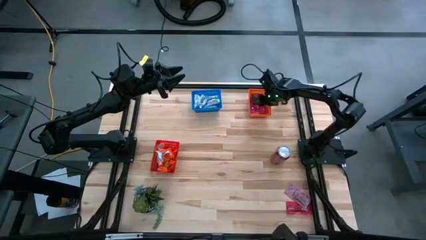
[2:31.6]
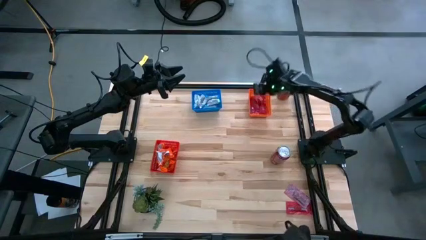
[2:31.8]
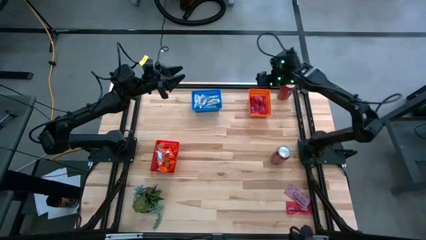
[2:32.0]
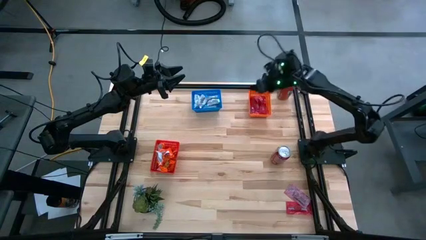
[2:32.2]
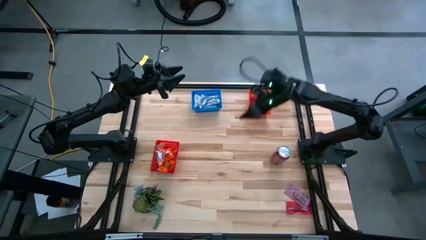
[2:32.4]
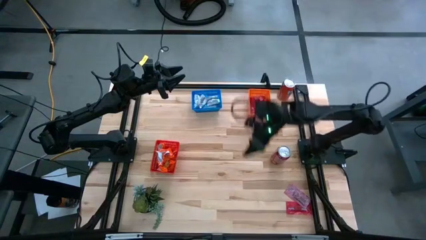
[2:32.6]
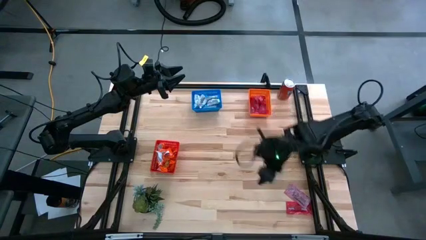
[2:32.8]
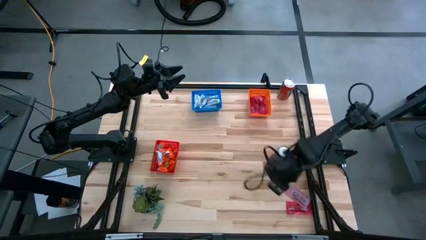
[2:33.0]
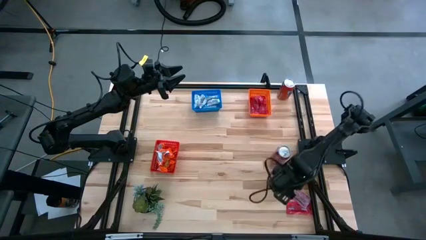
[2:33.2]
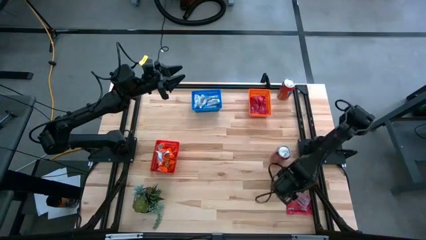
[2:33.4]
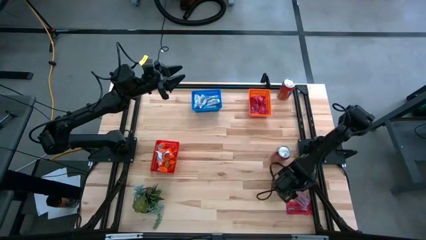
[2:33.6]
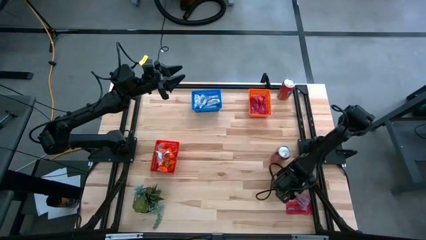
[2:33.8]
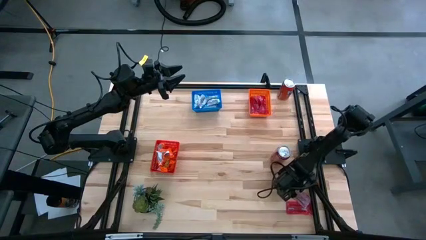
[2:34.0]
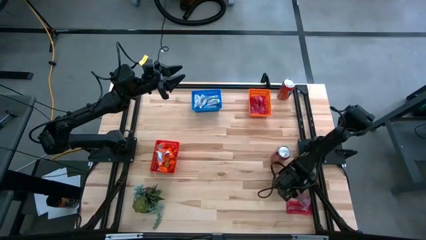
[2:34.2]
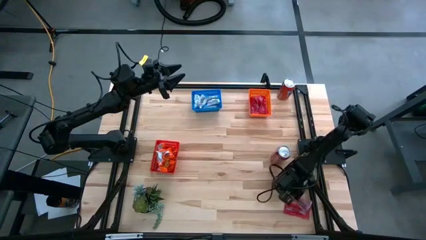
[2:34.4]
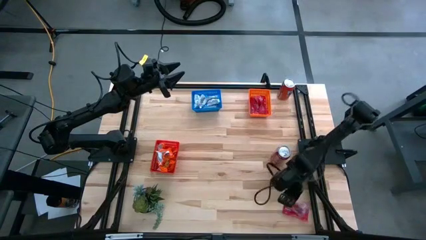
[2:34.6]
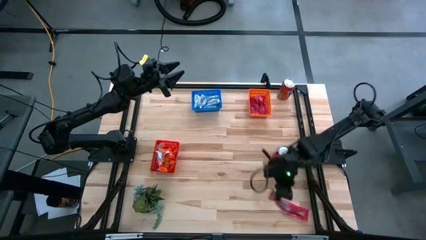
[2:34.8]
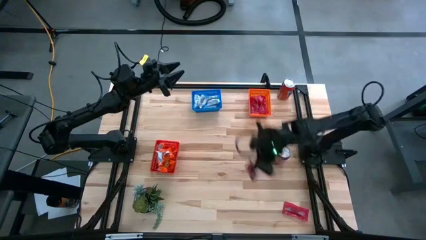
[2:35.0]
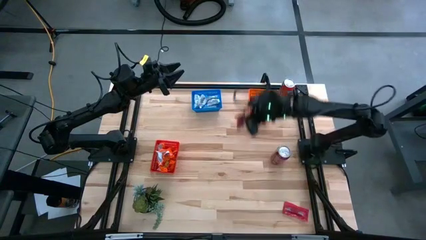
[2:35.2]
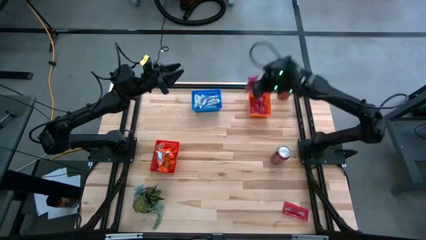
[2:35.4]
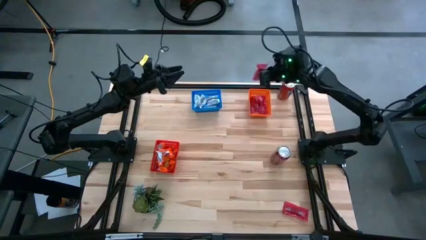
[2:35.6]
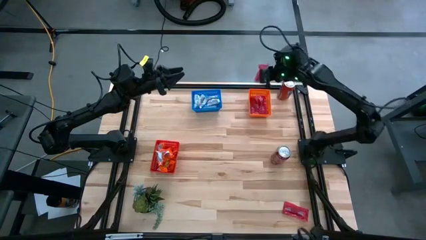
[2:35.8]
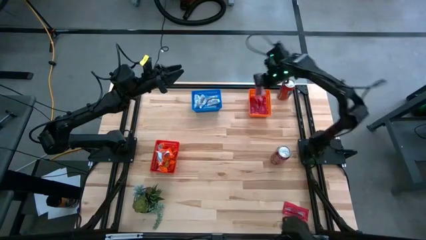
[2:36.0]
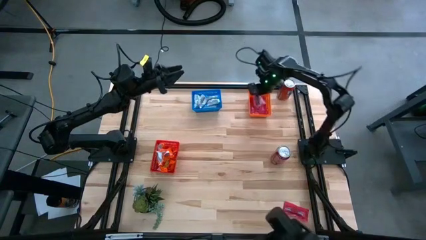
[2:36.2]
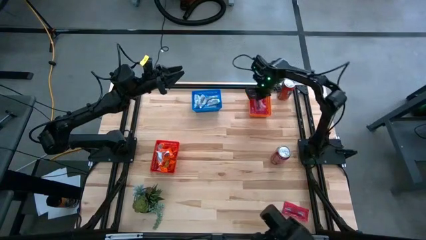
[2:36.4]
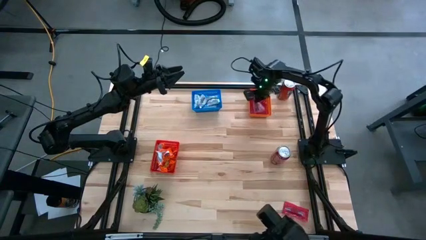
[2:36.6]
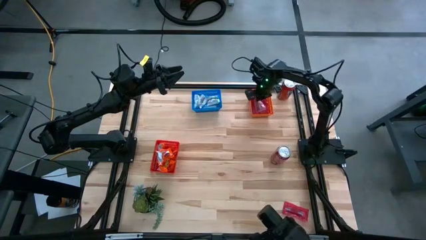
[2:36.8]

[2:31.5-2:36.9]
Task: Sort candy
Put the red candy pack into the orange basket

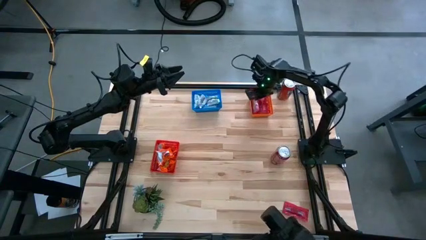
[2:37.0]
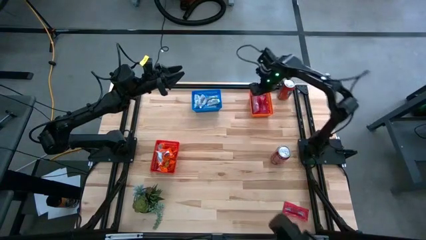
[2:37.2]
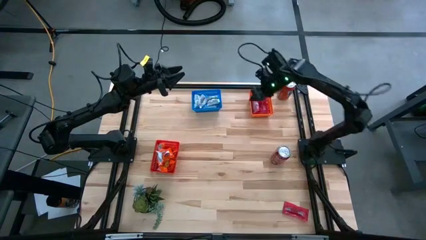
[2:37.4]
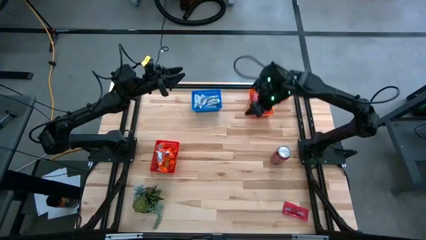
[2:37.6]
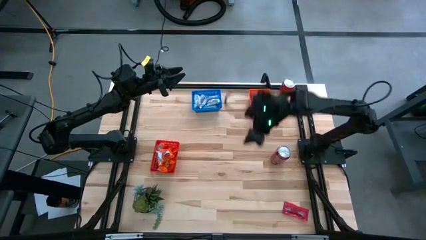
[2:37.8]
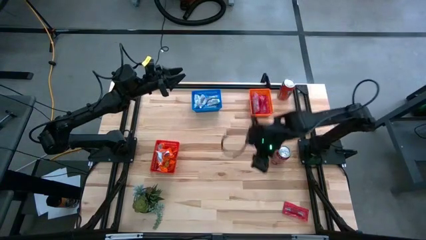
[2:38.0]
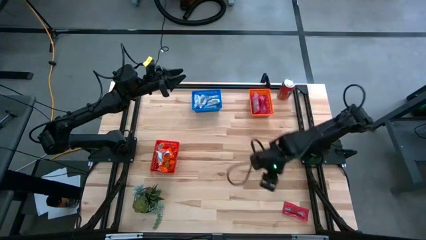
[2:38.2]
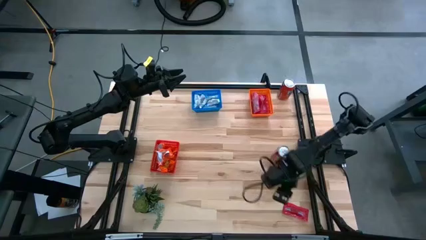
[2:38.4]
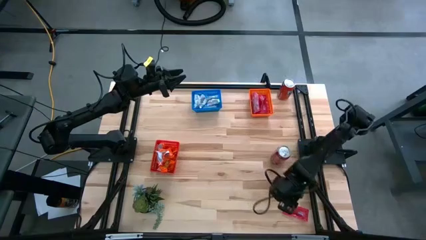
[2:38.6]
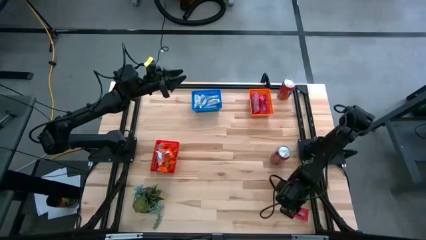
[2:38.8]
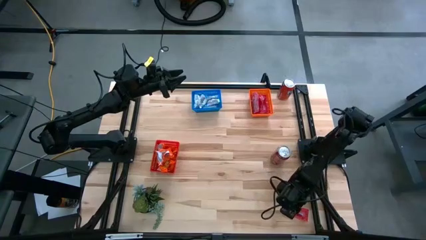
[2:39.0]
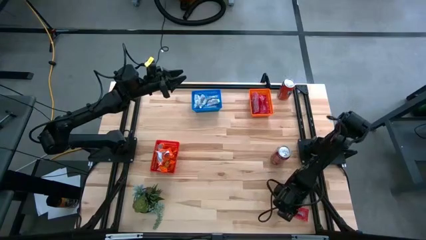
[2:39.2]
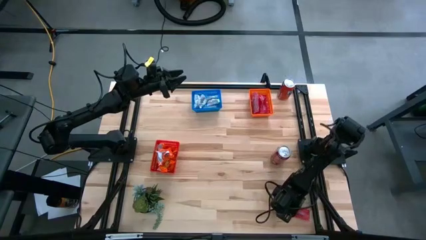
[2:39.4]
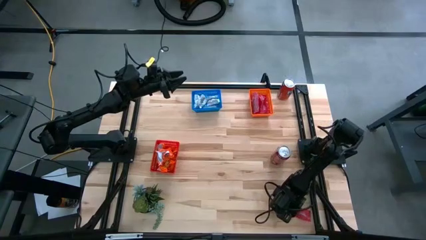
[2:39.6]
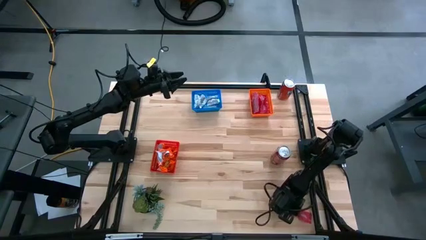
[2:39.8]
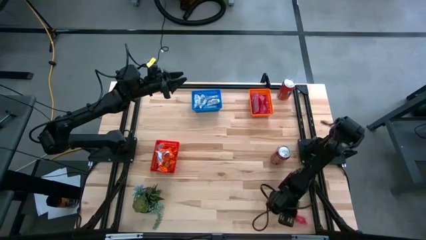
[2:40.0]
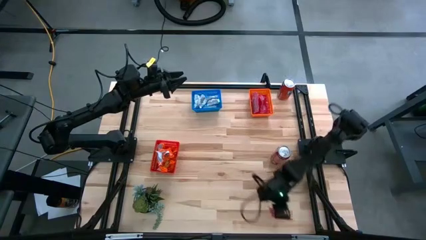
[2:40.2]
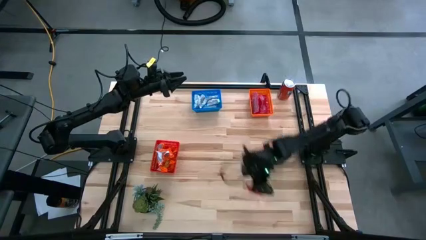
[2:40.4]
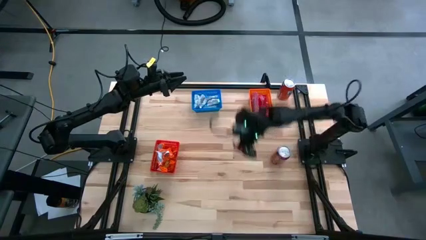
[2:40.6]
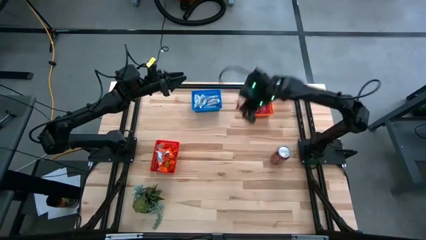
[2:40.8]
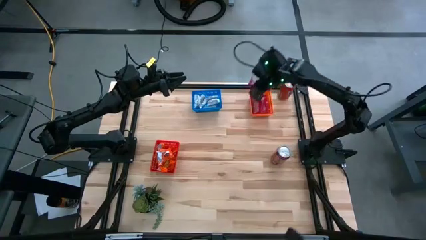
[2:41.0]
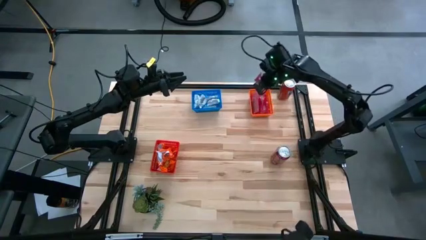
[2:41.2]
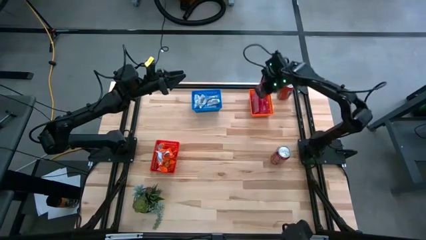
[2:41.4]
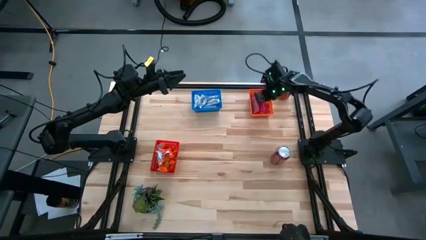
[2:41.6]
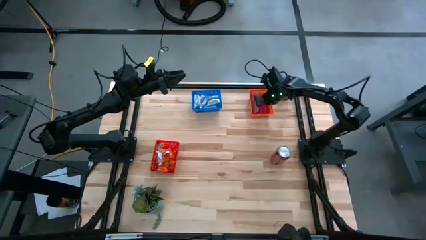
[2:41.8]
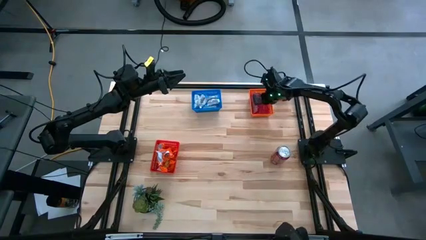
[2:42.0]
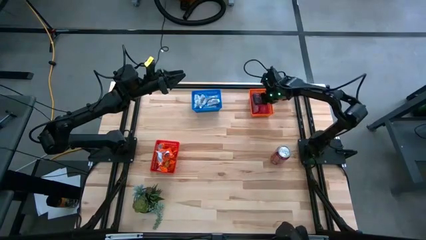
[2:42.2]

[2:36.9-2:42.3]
Put the red candy pack into the orange basket

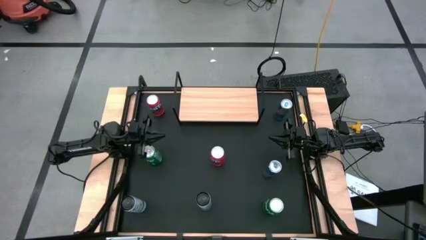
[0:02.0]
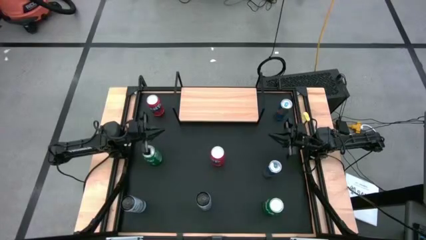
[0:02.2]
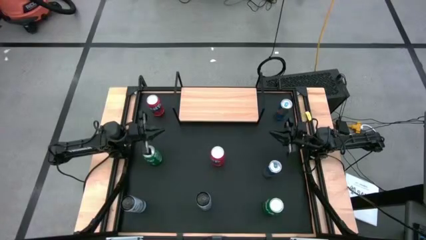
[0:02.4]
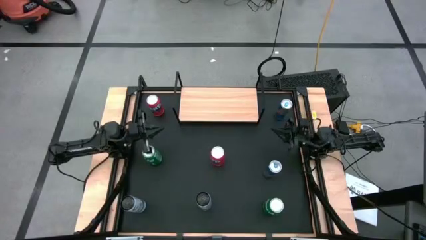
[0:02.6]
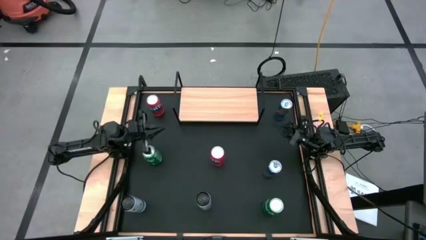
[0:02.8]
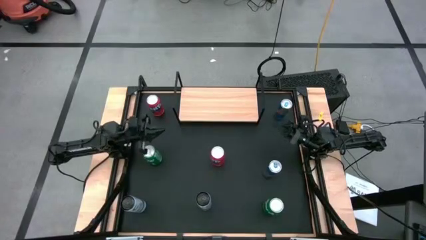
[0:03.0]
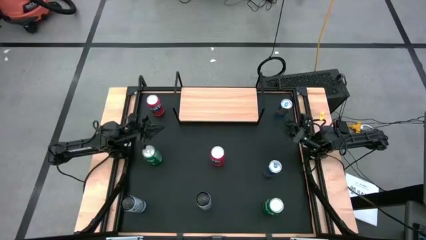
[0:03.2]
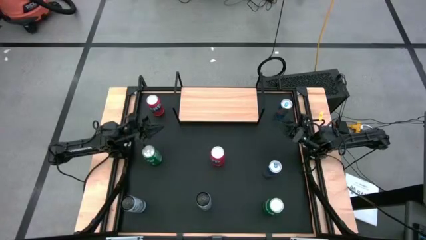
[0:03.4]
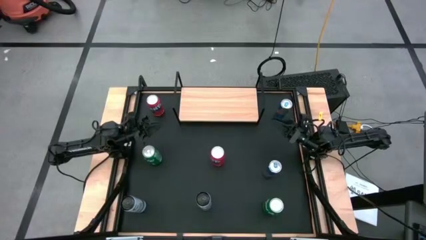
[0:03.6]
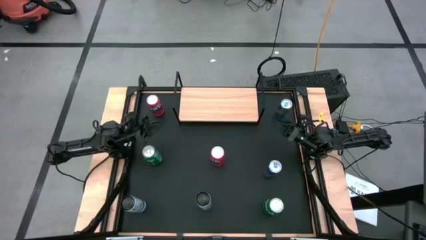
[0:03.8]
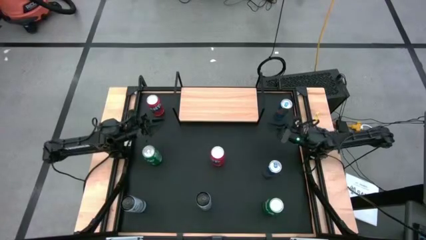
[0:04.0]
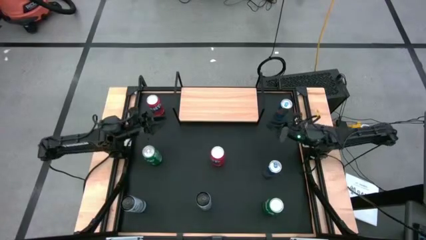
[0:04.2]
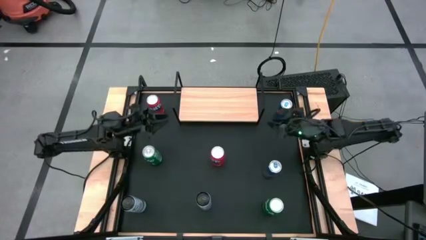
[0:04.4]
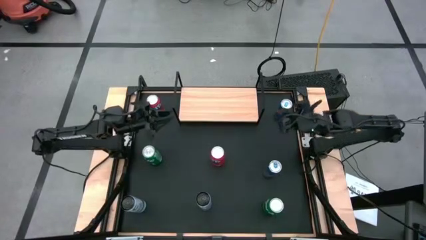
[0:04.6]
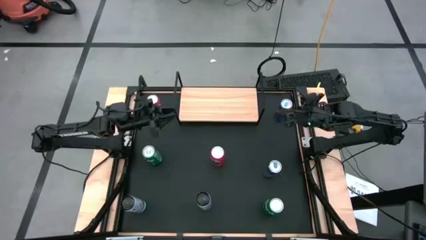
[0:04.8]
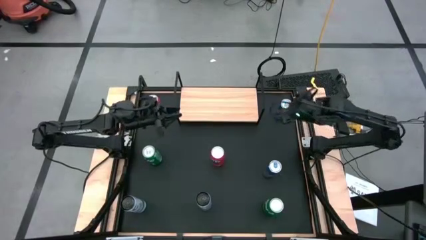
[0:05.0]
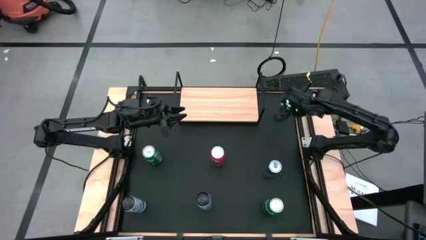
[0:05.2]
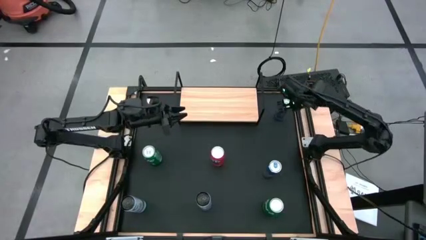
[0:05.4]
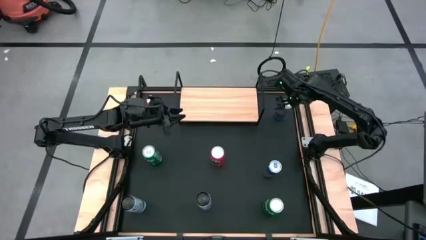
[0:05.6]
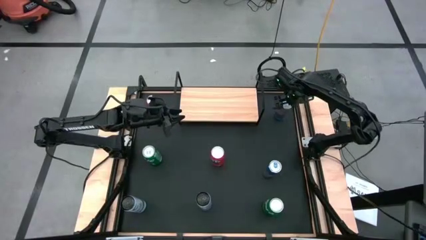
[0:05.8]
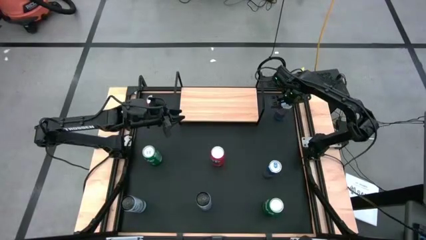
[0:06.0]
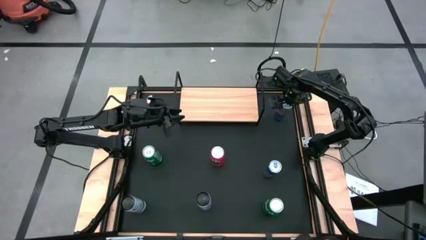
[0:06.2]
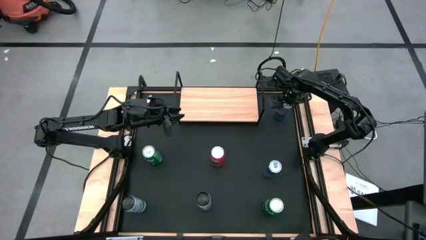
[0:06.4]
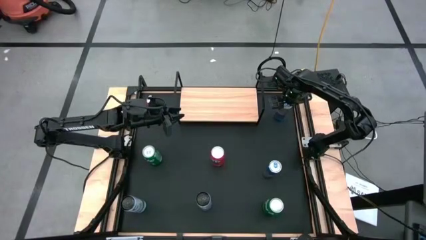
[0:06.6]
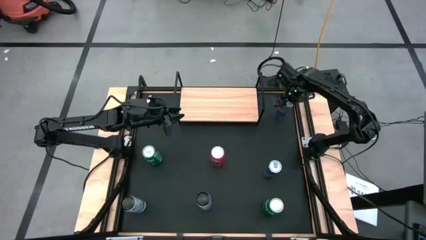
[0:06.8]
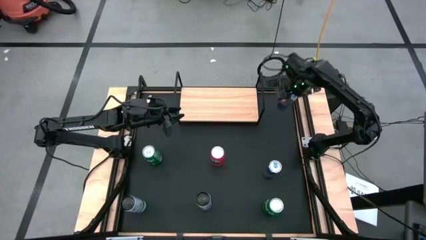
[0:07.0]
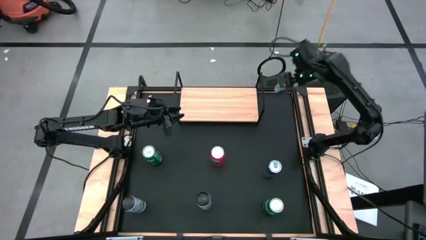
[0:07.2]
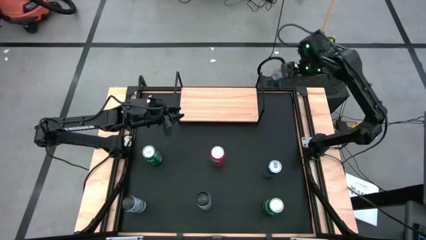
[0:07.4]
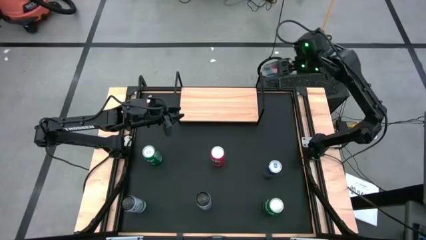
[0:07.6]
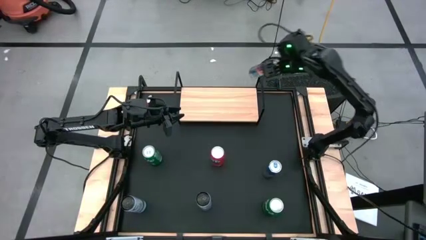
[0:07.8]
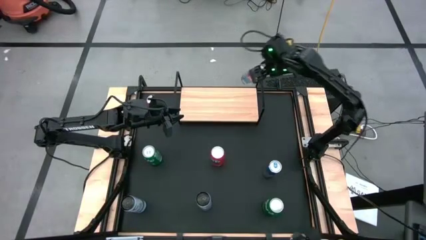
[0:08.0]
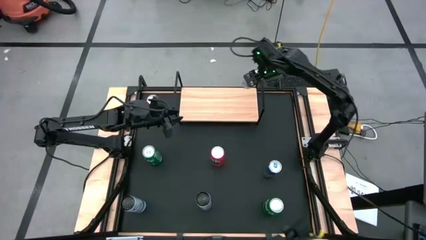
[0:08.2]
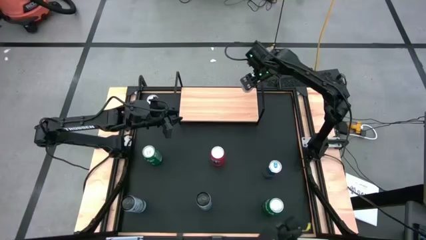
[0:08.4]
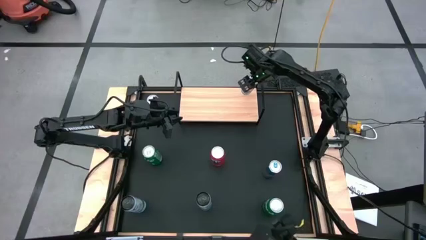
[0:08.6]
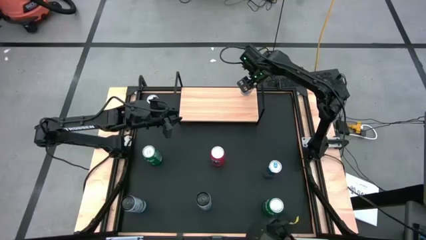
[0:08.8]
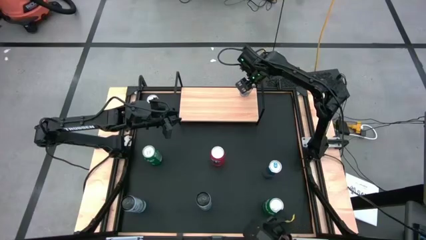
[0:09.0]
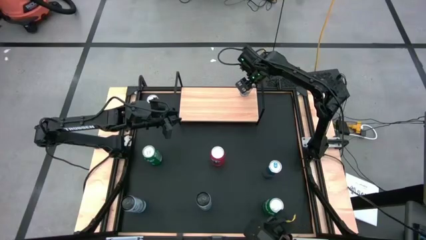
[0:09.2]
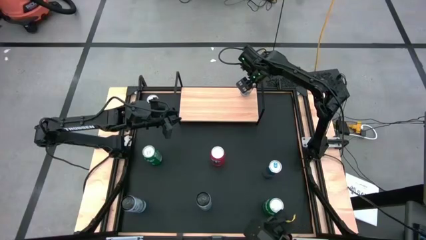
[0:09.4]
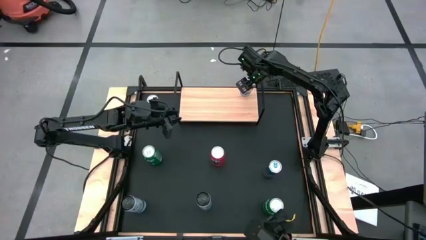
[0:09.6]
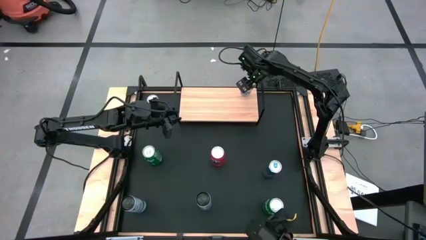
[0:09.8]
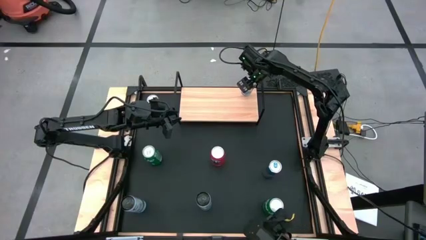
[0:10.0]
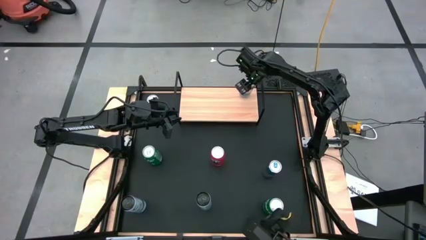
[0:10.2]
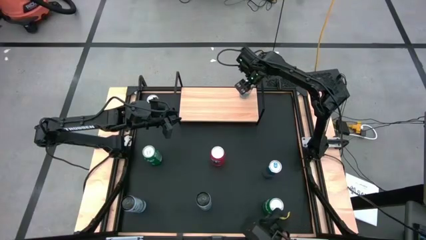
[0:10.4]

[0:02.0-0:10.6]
Task: Place canned beverage on shelf
Put the top blue soda can on the shelf
